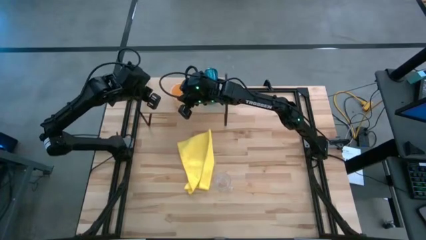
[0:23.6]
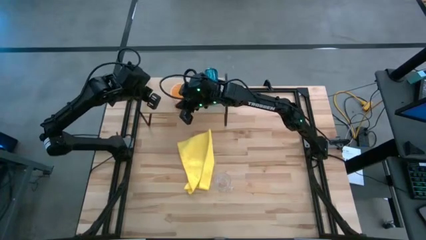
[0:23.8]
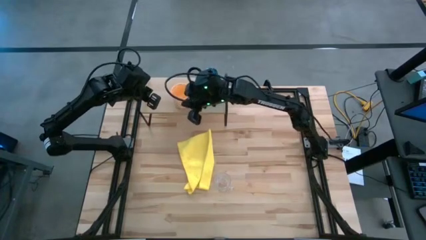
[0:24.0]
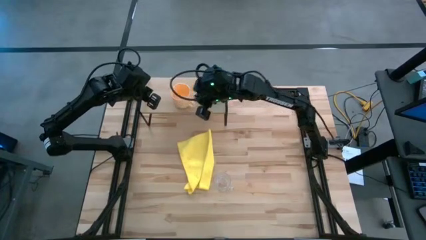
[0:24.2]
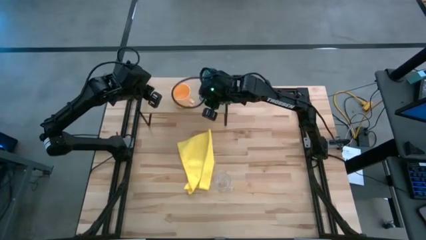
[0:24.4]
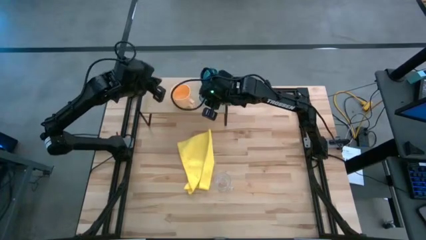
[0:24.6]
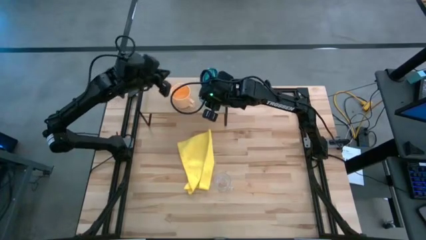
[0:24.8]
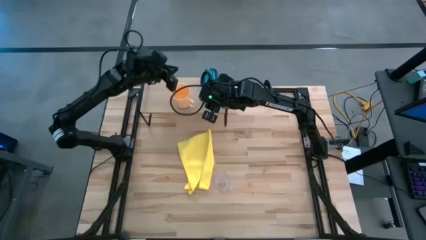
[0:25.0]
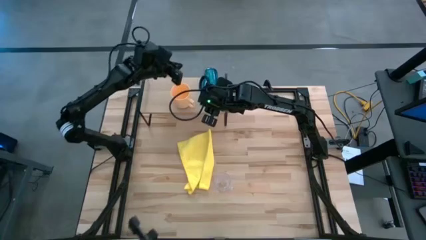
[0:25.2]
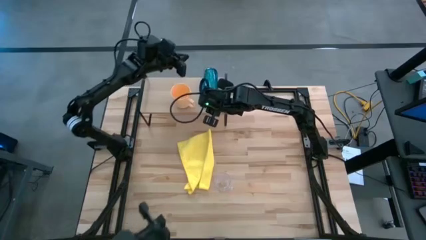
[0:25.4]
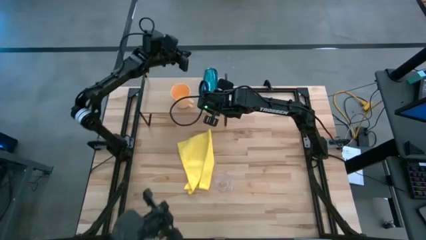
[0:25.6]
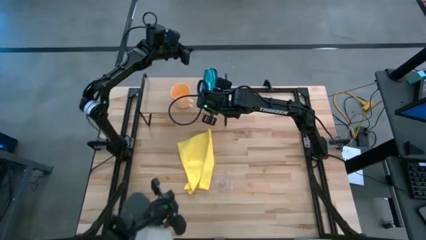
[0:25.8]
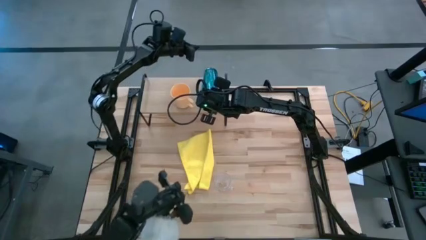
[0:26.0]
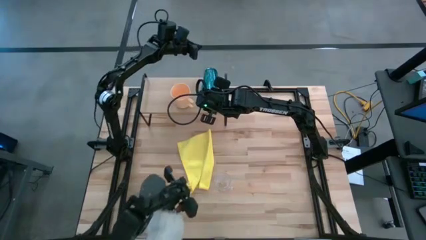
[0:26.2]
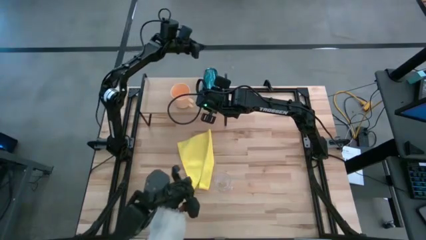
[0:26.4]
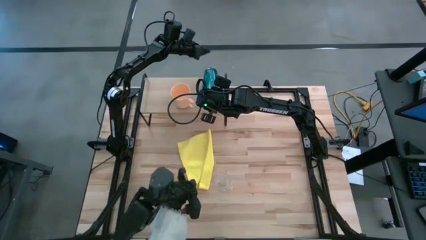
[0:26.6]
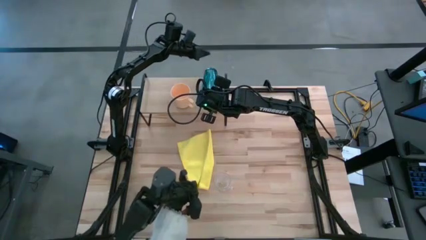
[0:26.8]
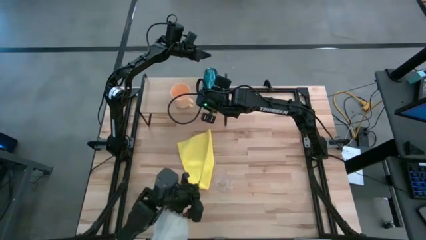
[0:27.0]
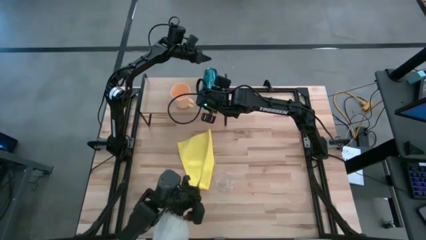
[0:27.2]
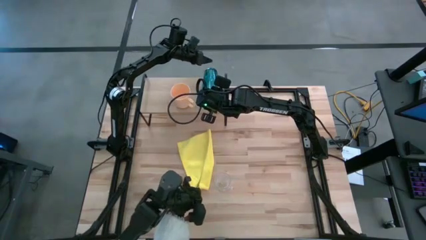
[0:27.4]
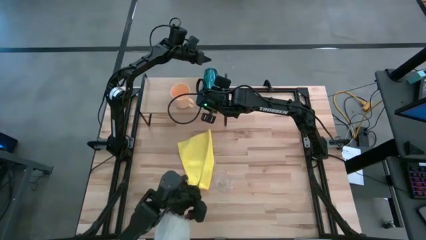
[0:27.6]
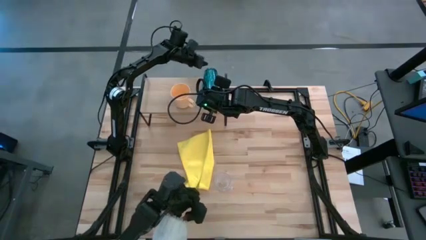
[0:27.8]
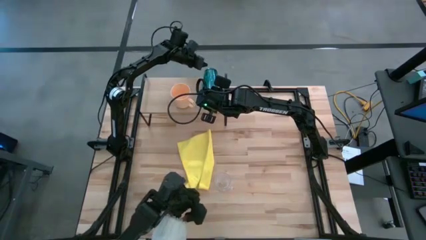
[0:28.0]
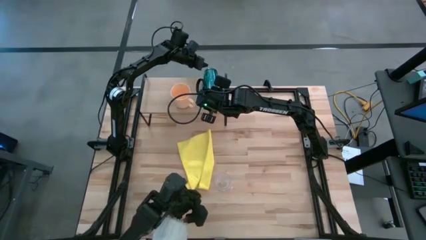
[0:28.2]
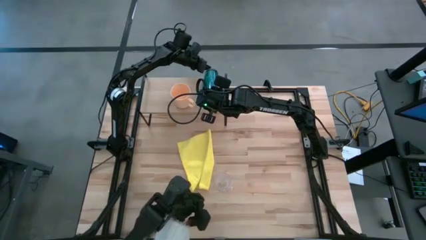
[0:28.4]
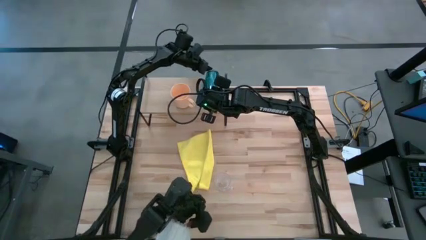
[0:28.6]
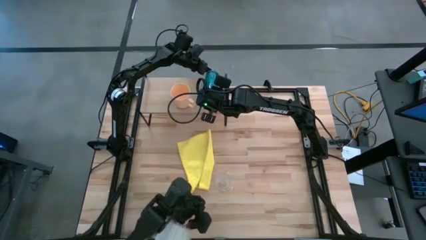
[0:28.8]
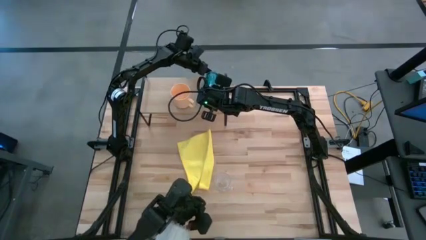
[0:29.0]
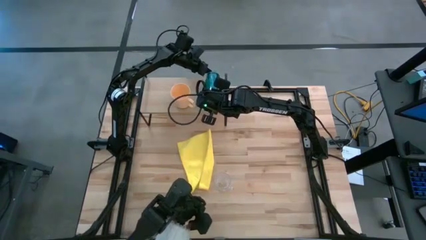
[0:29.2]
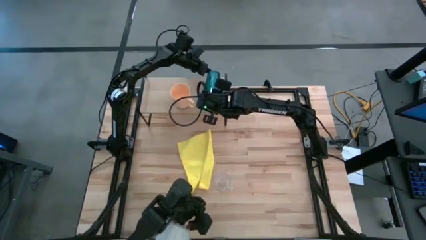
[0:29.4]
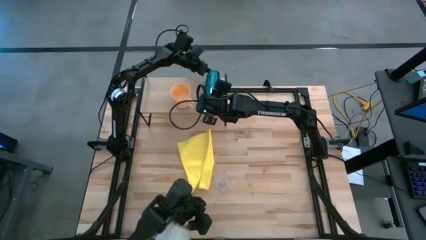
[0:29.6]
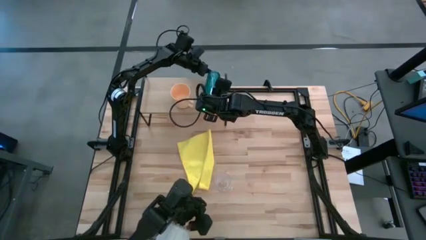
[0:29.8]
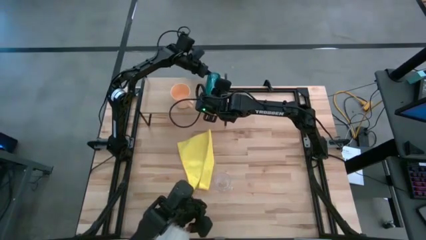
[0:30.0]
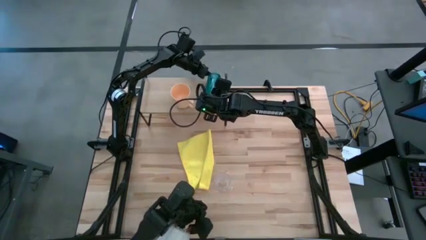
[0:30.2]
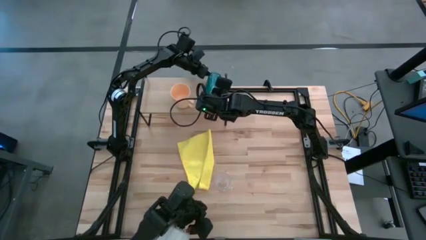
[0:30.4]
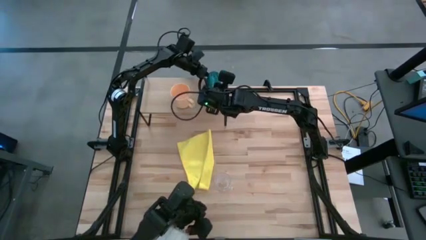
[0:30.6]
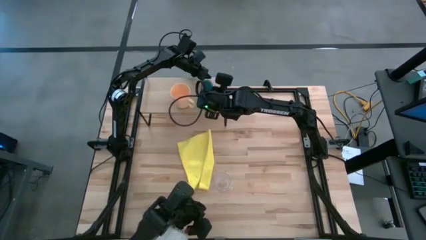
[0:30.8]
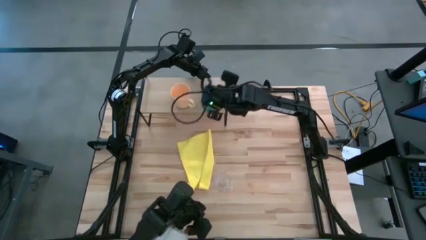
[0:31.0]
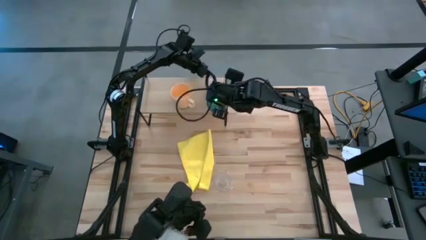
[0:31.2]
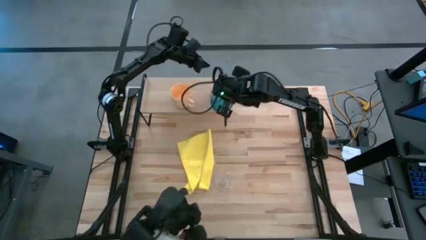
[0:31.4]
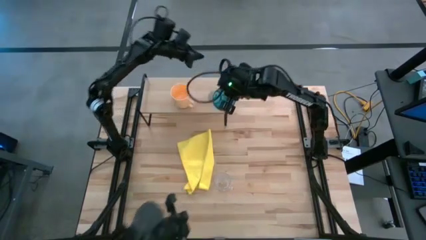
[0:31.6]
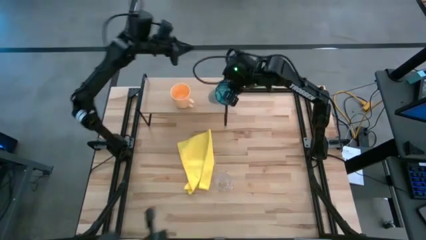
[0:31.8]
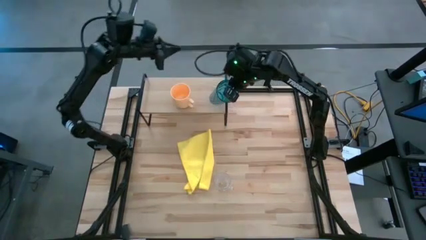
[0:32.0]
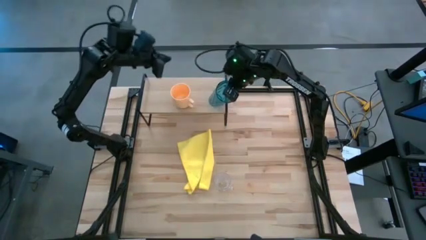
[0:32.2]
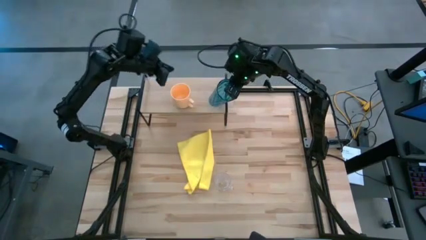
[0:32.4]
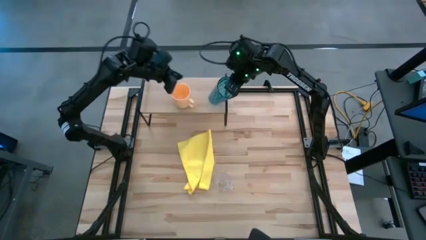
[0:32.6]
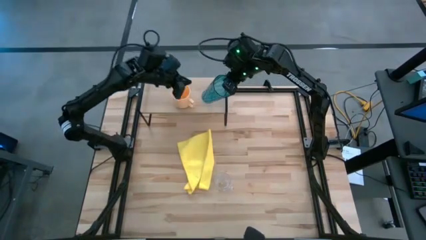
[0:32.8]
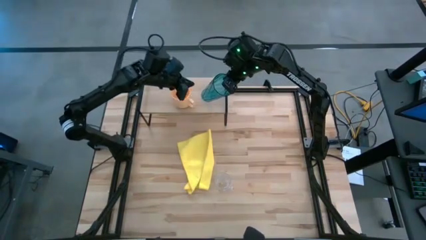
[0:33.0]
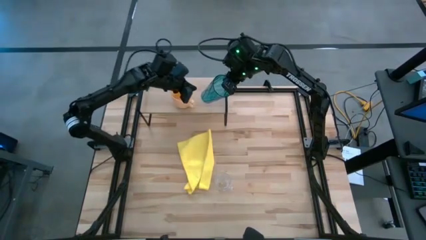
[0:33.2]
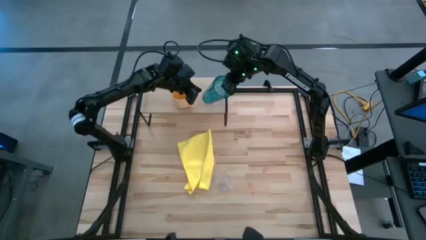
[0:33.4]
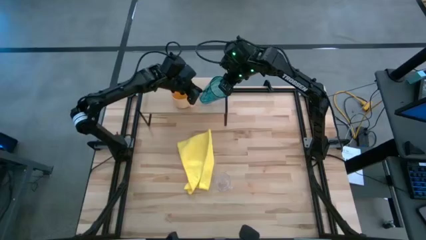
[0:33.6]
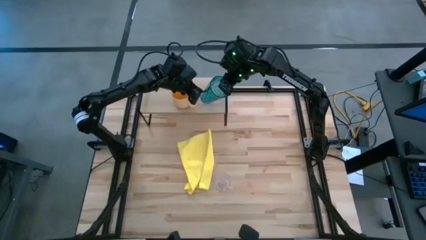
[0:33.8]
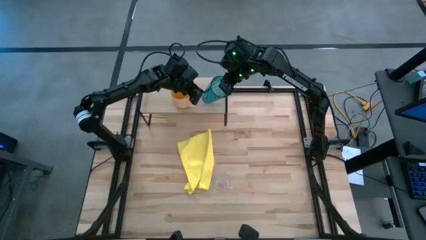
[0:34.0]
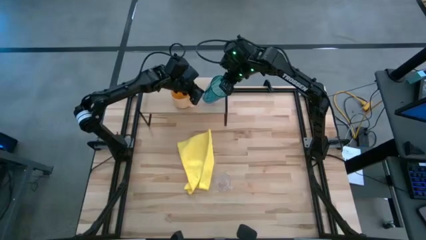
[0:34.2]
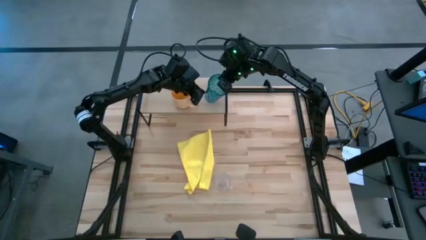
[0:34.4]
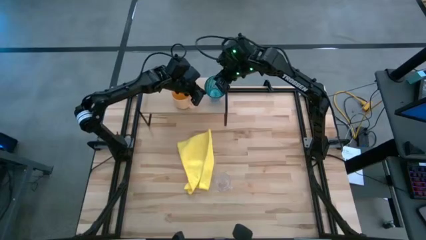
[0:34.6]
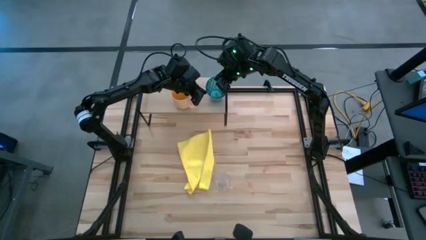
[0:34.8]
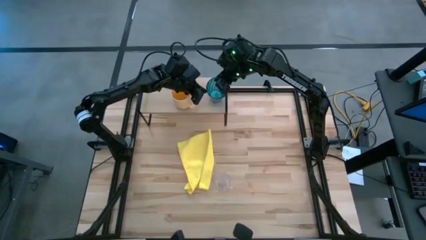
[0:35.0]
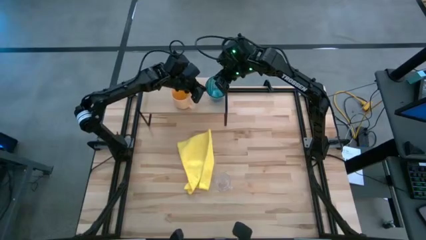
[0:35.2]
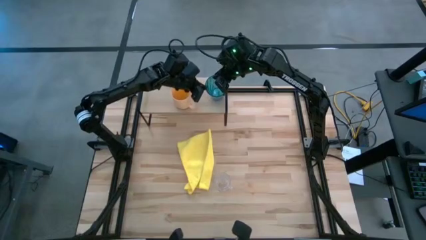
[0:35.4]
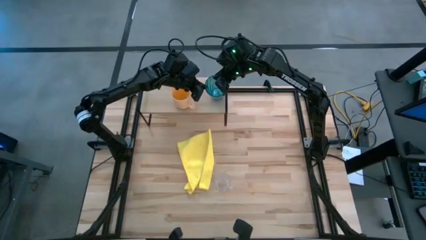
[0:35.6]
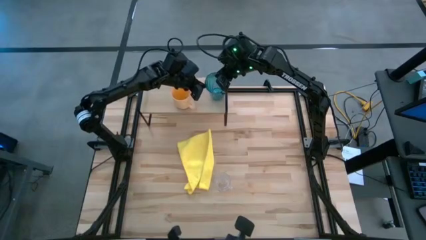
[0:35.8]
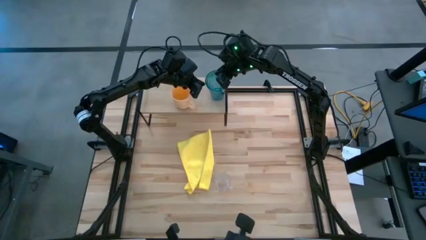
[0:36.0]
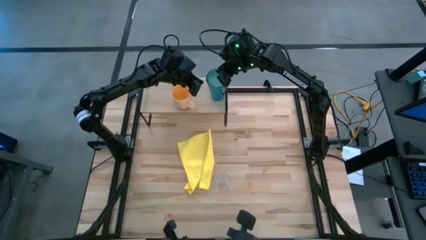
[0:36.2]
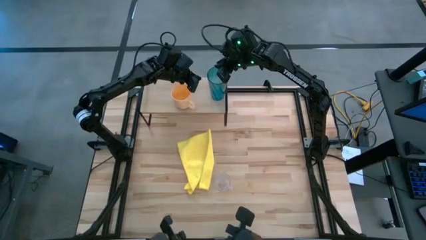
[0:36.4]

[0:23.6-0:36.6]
Task: Stack small to large cups/mugs on shelf
Adjust the blue cup on the shelf

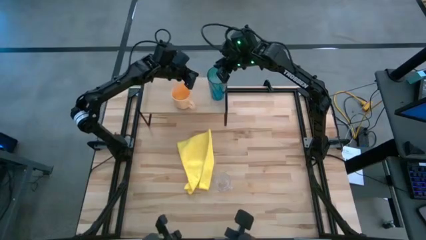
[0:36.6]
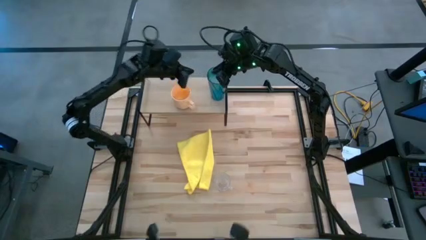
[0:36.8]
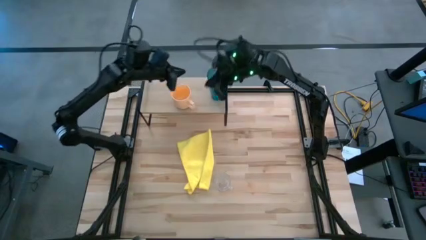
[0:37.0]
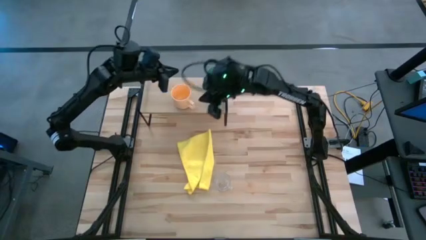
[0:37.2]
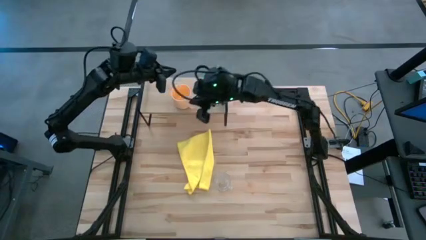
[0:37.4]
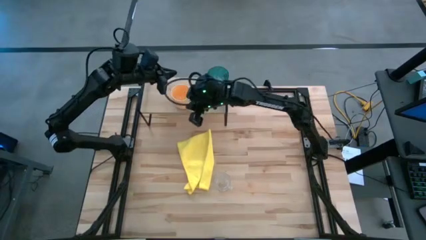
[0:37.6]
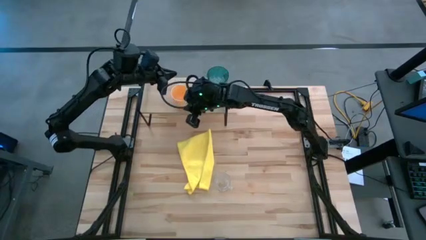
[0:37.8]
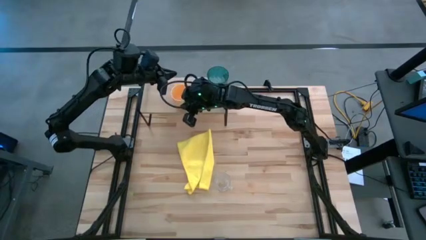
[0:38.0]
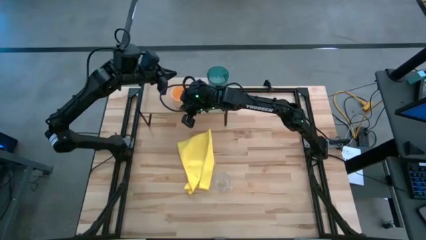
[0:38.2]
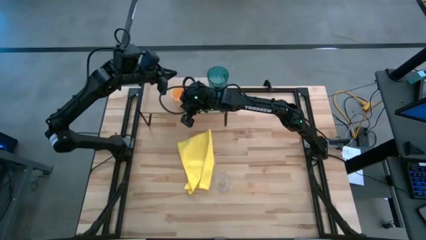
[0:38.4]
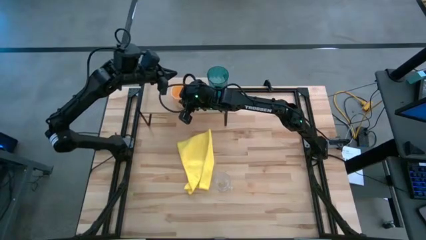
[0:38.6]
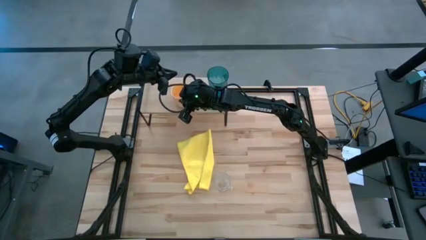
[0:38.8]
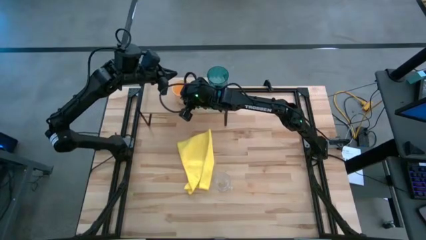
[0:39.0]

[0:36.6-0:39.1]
Adjust the orange mug on the shelf

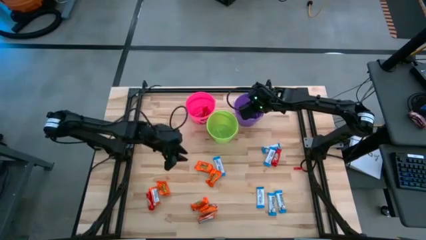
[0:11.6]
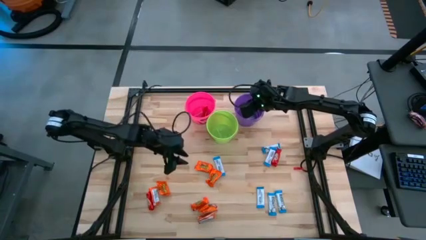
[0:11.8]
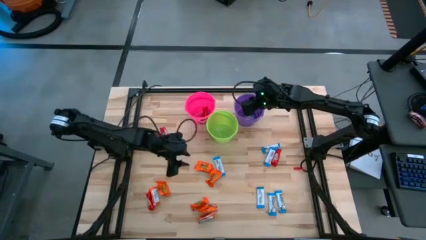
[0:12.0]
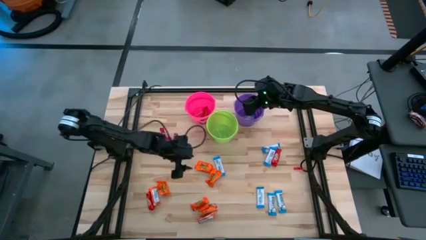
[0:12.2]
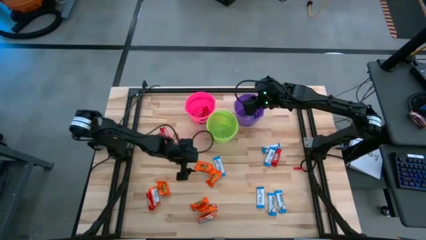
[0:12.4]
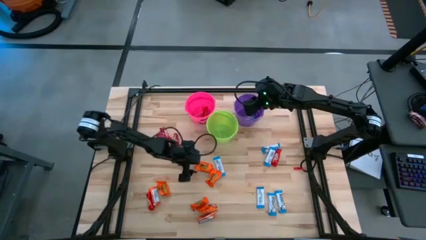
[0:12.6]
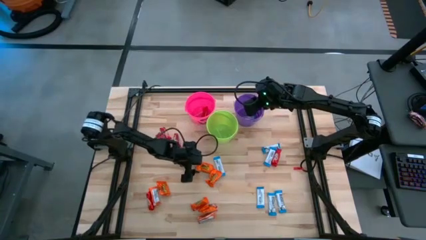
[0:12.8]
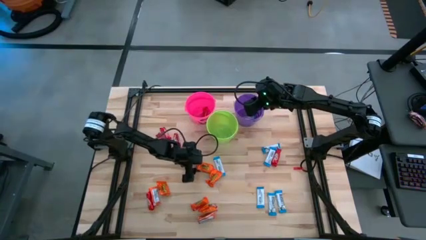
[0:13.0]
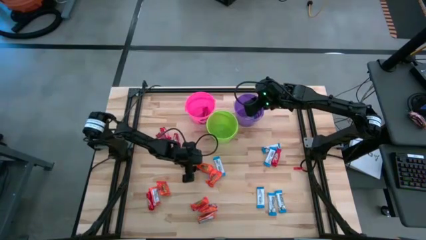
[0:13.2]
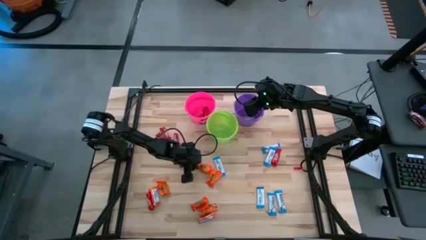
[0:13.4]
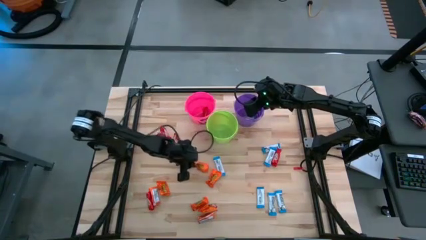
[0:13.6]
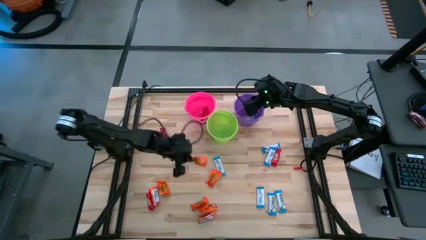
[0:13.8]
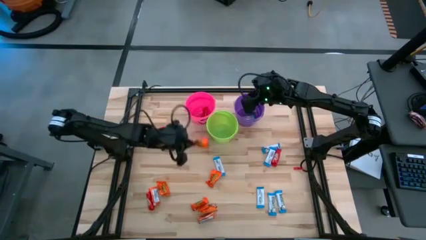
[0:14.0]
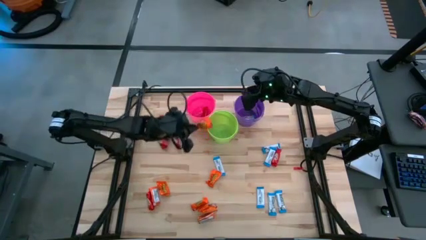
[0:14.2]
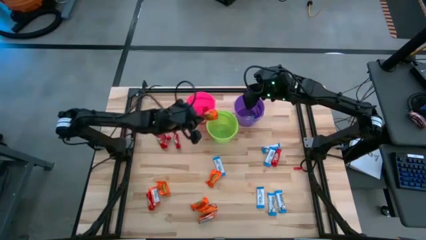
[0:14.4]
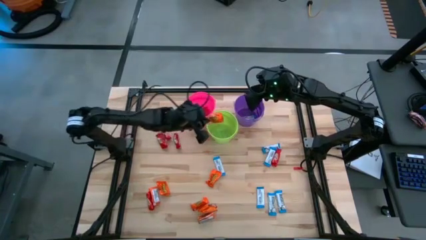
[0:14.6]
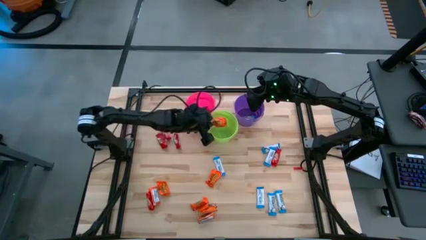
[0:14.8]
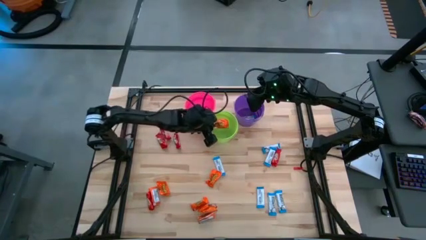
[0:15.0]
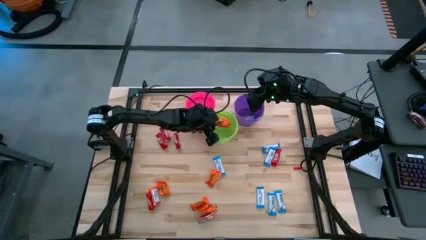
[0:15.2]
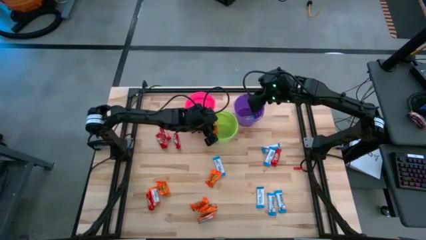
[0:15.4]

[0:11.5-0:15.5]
Task: Sort candy
Put the orange candy into the green bin
